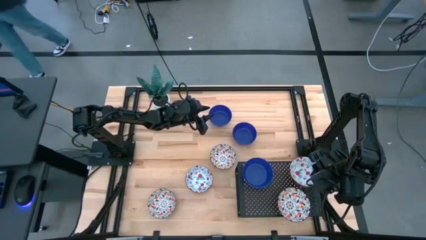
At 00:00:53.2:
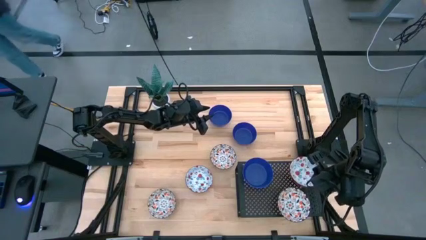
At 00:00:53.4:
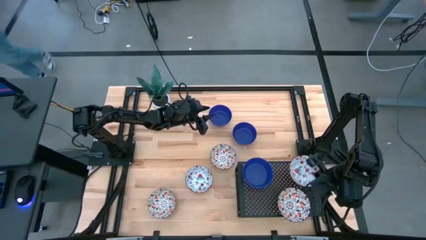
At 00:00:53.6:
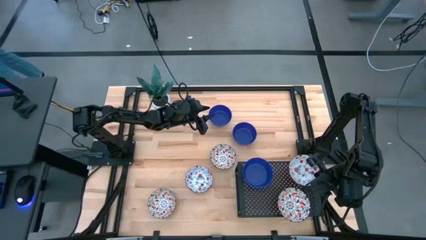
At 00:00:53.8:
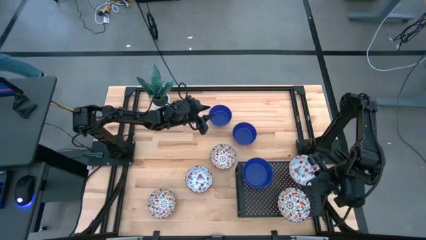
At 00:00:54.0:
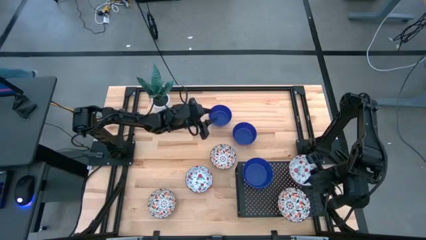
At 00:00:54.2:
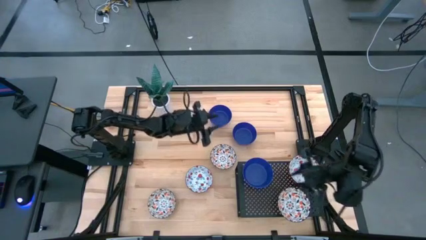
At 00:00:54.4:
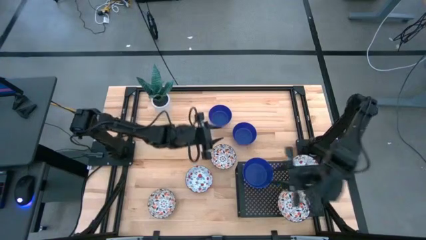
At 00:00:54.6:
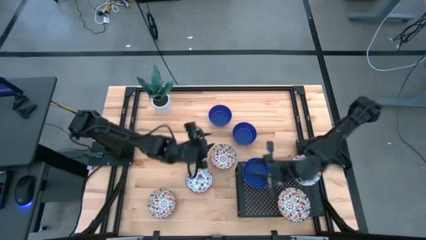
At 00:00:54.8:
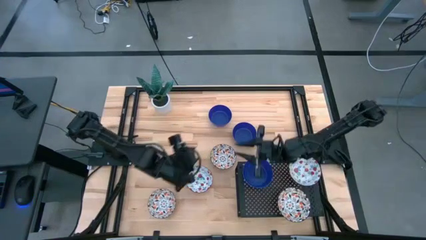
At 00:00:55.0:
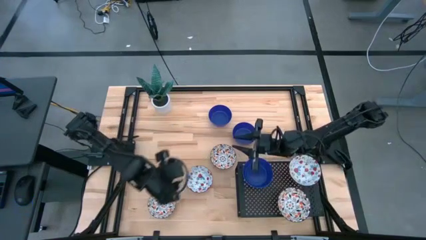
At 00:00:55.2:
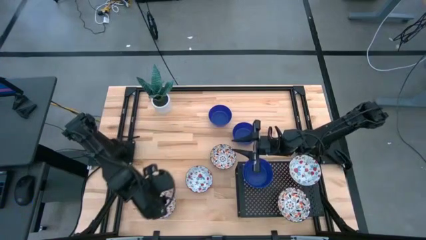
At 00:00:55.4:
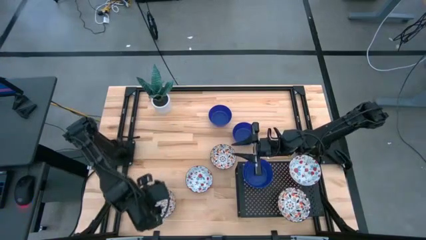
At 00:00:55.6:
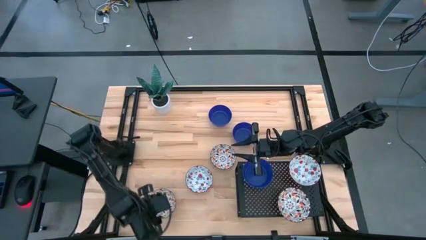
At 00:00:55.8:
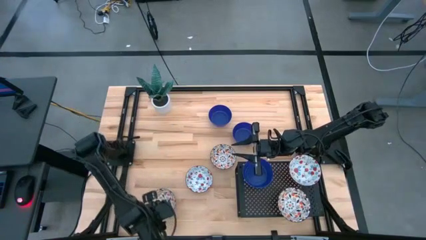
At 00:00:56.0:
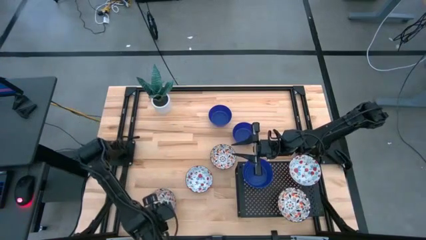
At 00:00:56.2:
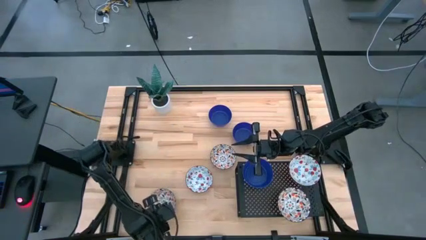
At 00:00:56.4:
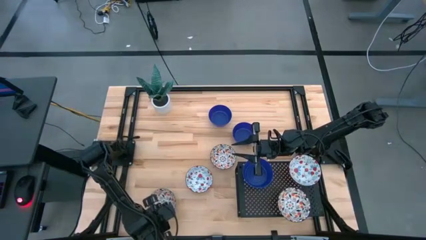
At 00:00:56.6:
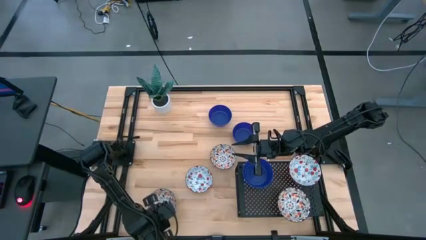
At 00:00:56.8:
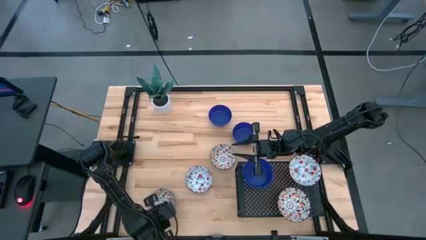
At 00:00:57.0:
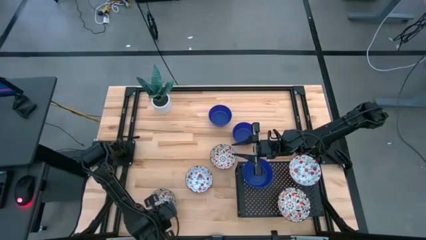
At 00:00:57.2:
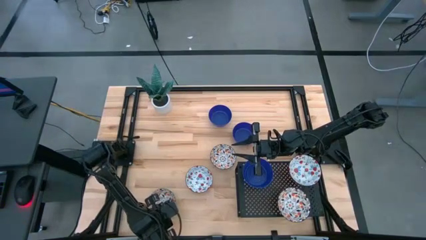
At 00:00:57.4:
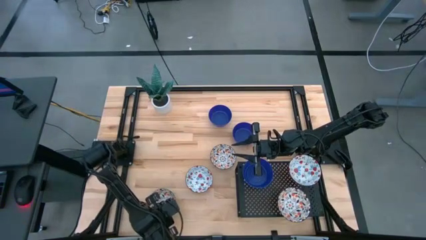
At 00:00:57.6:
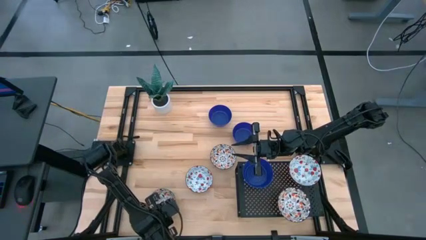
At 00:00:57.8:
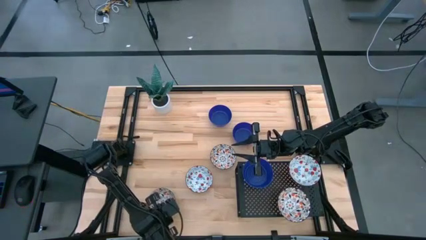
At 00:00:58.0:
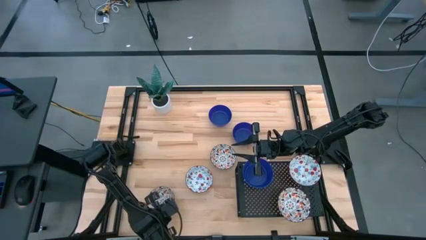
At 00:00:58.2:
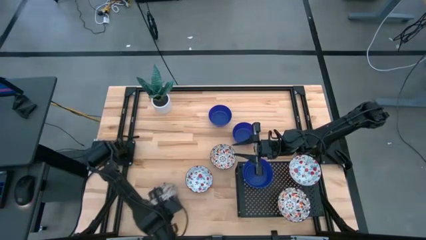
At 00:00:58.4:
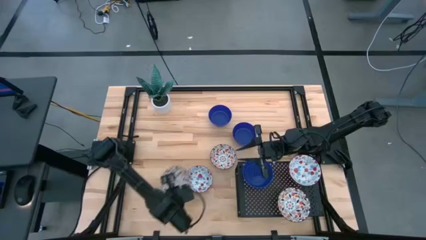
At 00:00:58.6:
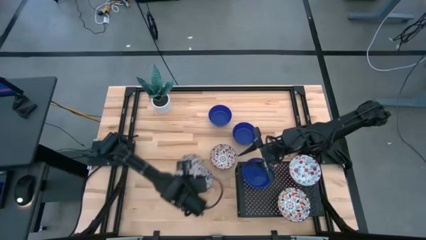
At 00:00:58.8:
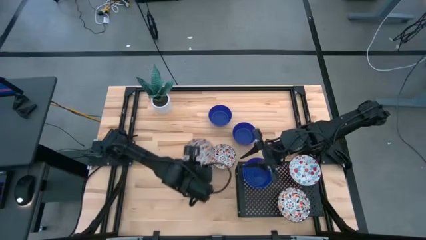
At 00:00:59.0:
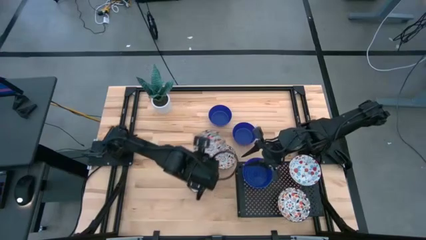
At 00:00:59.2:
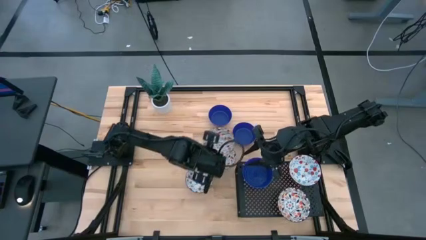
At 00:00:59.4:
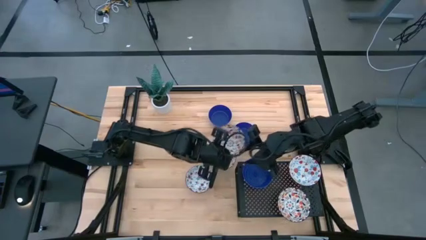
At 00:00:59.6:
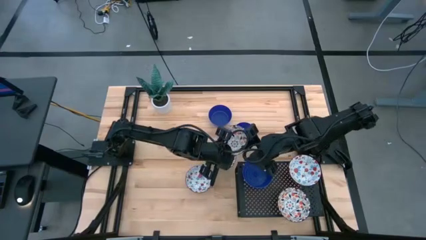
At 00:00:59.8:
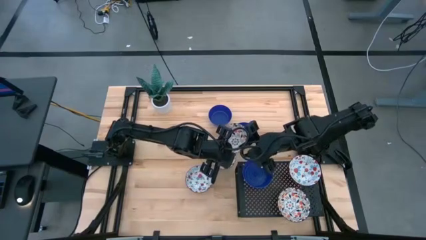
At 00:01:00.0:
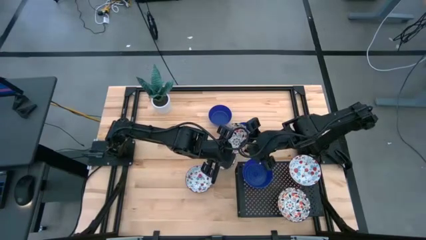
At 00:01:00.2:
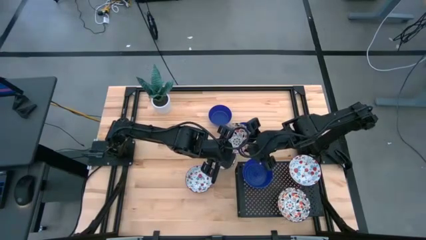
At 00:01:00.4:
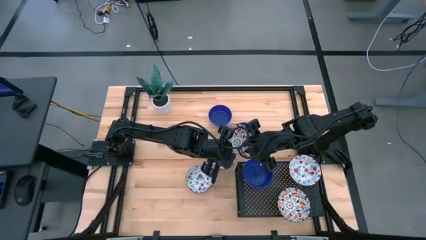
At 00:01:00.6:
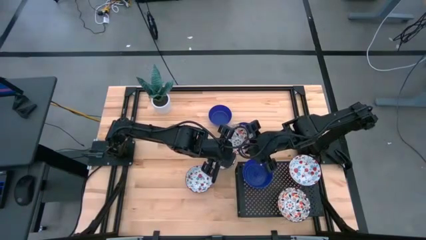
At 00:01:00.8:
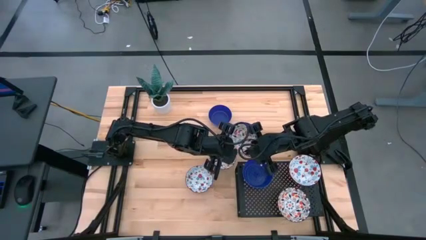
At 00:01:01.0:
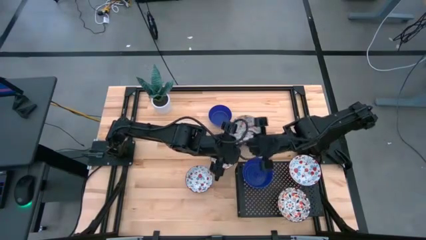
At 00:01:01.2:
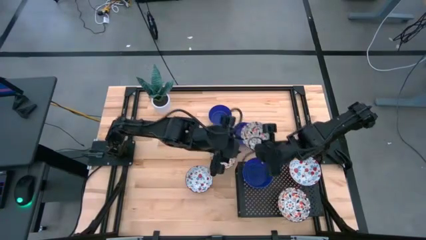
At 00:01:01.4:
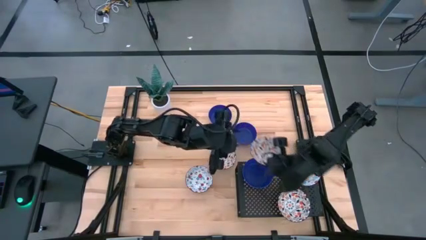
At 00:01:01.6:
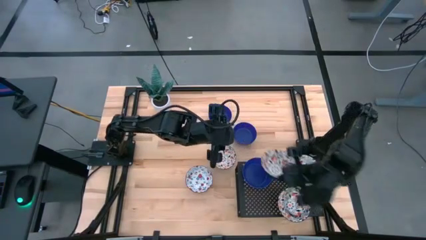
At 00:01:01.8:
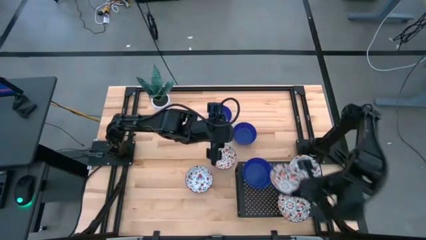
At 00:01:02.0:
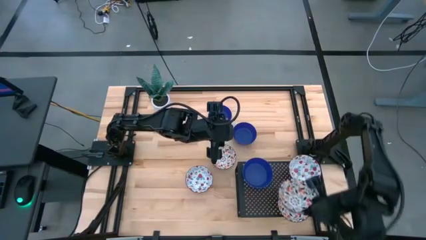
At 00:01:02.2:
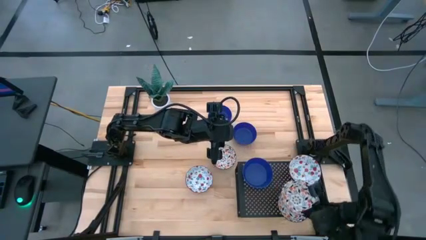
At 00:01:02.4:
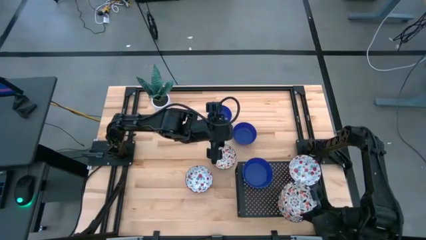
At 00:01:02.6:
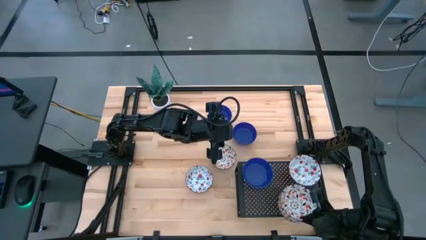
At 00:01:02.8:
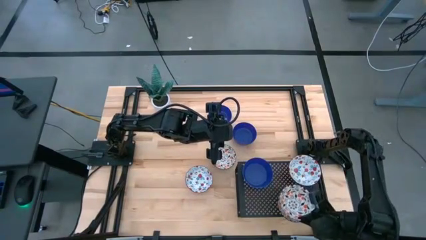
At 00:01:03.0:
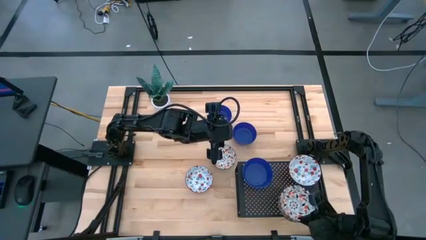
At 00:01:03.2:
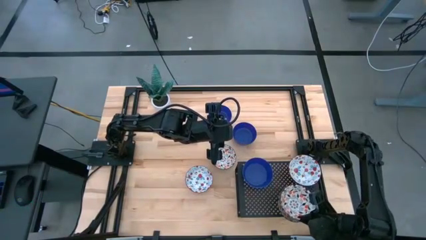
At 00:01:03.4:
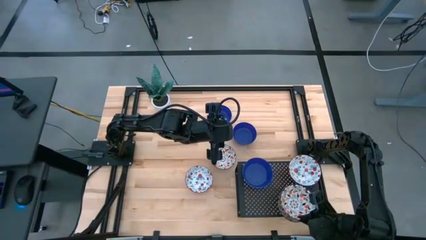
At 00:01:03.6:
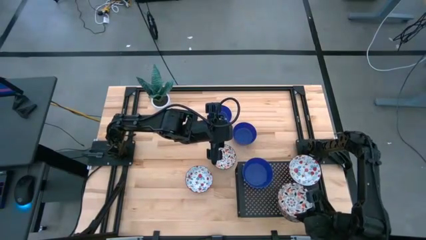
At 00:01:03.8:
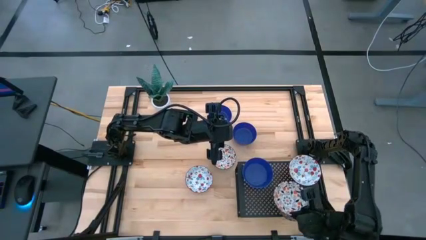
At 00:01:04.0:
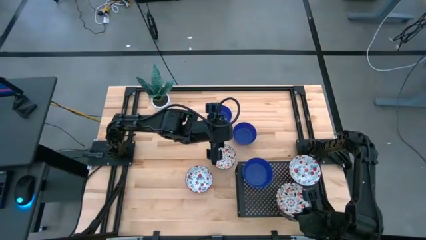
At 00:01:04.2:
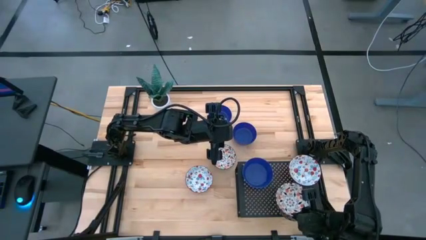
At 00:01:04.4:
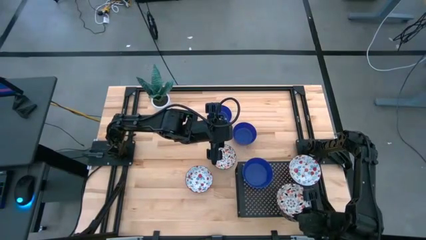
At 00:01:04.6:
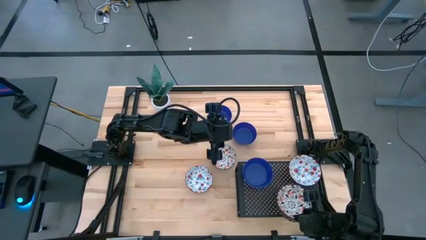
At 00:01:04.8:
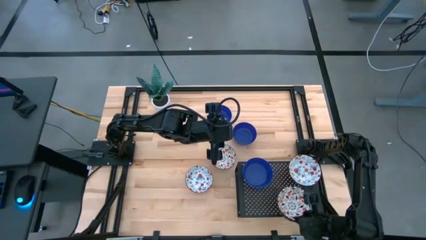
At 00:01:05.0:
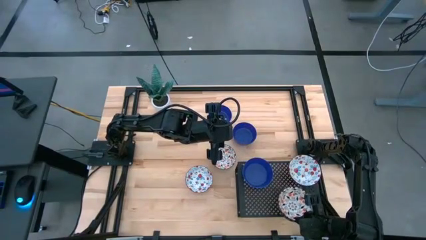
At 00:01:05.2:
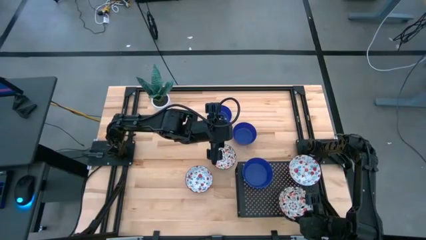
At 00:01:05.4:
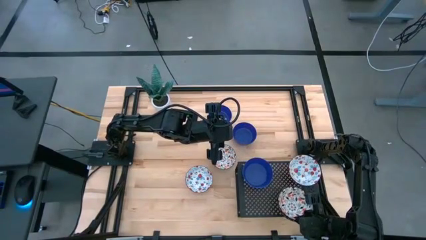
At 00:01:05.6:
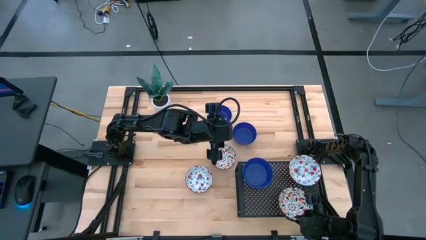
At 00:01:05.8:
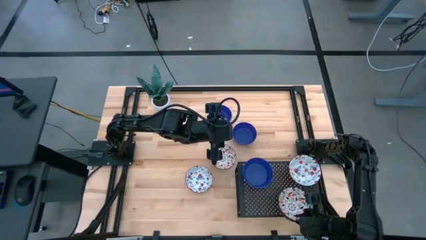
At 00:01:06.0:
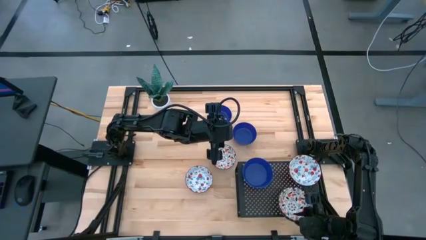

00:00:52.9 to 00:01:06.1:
Task: Pick & Place Mini bowls
Stack the bottom orange patterned bowl on the orange patterned bowl on the shelf
